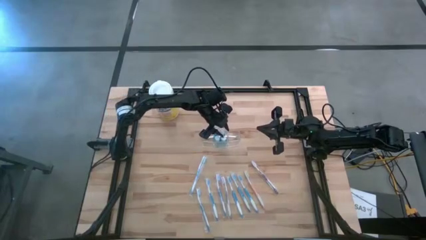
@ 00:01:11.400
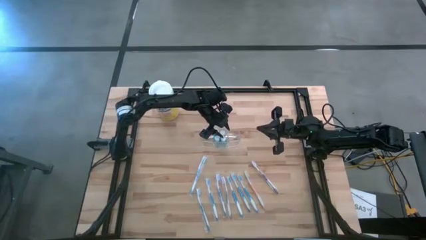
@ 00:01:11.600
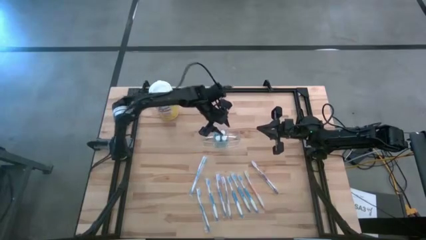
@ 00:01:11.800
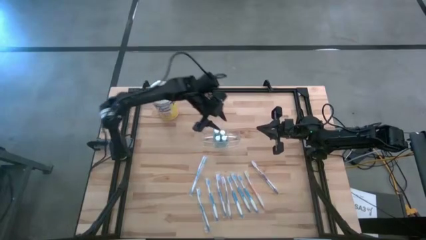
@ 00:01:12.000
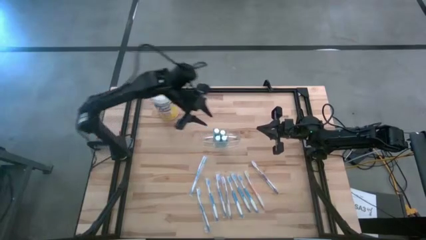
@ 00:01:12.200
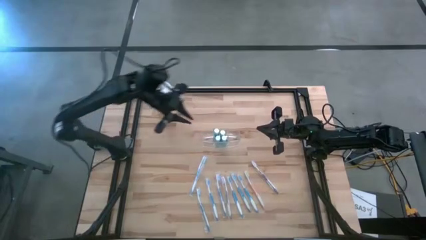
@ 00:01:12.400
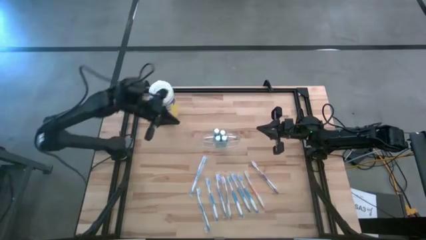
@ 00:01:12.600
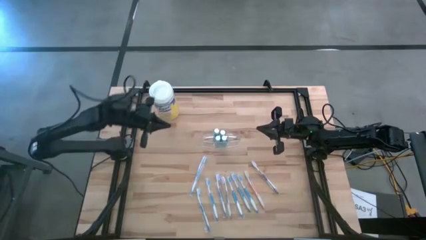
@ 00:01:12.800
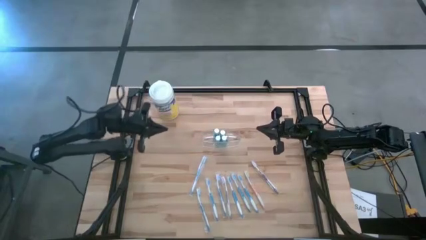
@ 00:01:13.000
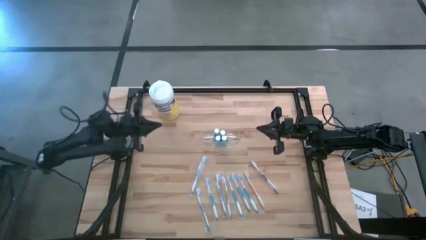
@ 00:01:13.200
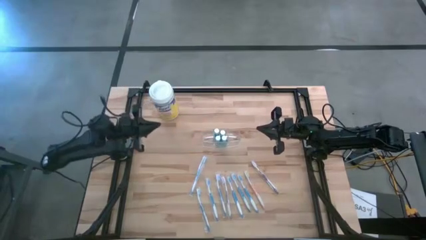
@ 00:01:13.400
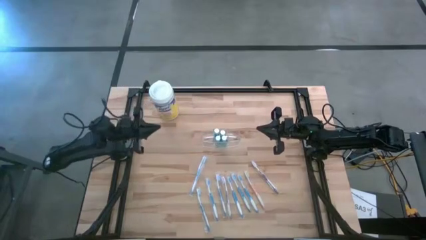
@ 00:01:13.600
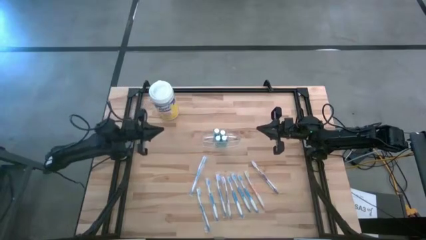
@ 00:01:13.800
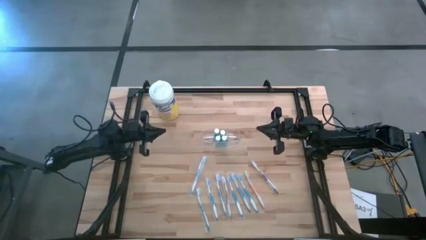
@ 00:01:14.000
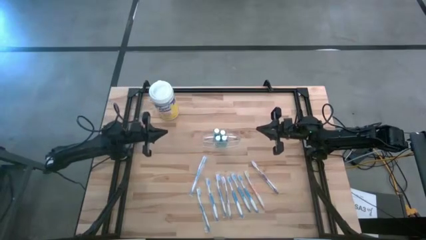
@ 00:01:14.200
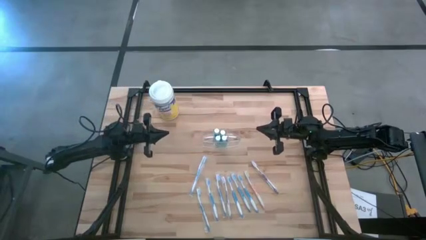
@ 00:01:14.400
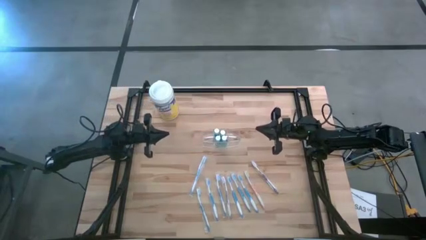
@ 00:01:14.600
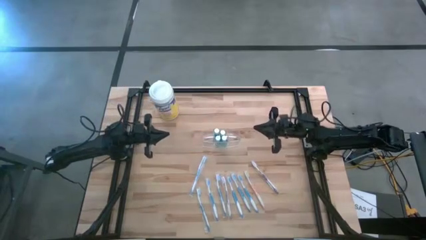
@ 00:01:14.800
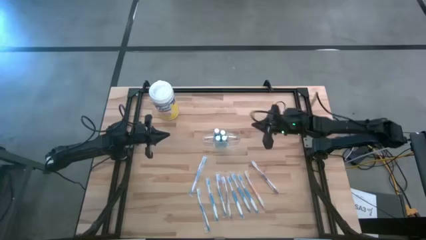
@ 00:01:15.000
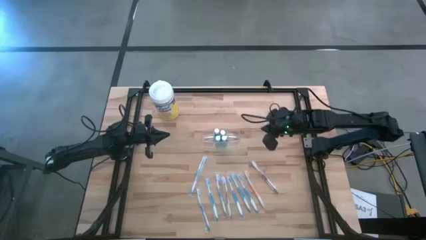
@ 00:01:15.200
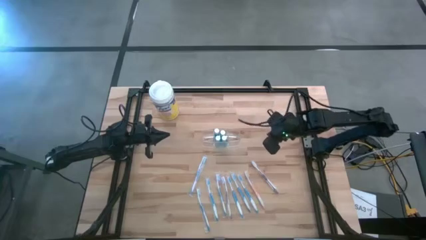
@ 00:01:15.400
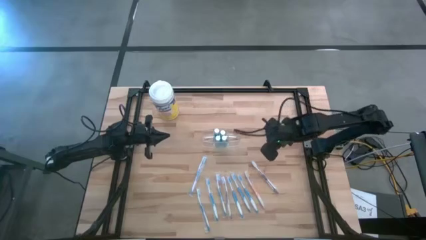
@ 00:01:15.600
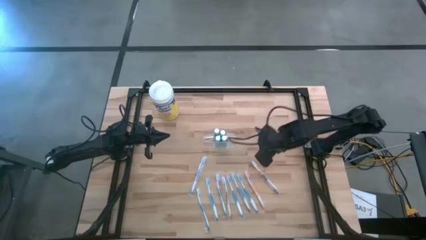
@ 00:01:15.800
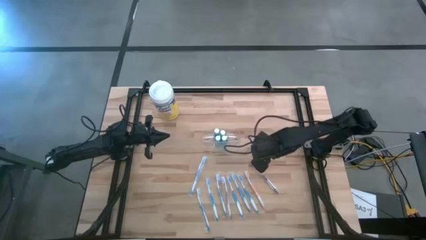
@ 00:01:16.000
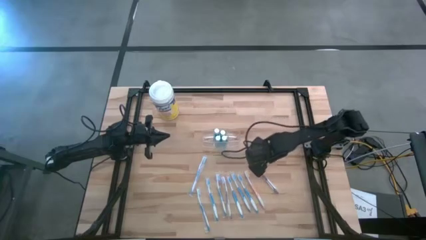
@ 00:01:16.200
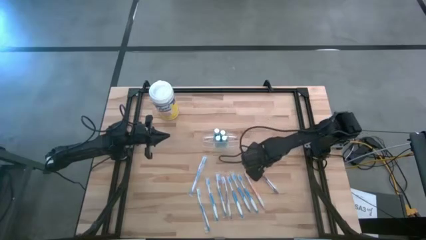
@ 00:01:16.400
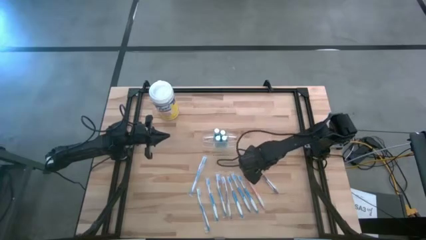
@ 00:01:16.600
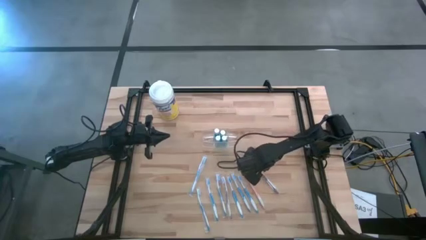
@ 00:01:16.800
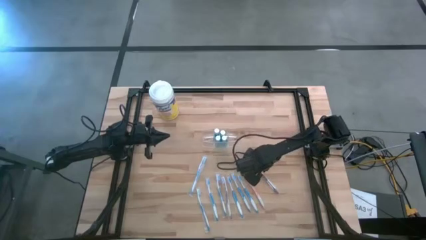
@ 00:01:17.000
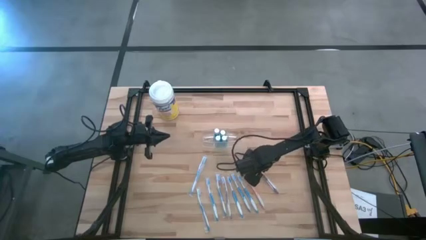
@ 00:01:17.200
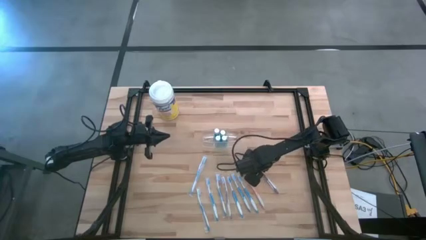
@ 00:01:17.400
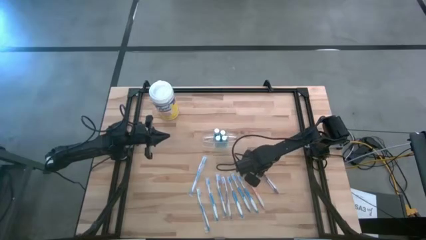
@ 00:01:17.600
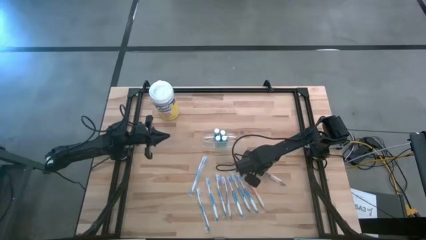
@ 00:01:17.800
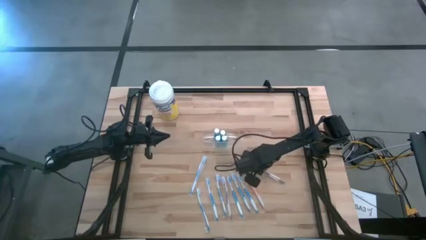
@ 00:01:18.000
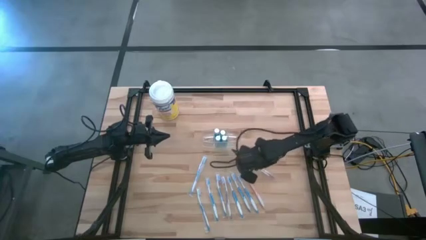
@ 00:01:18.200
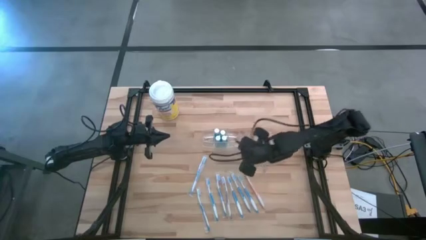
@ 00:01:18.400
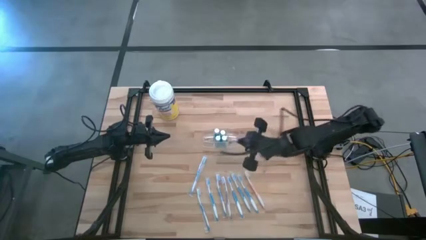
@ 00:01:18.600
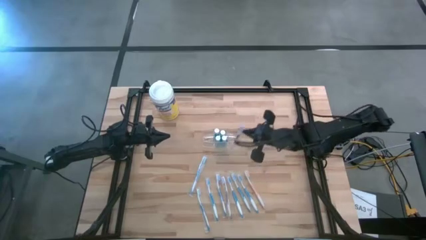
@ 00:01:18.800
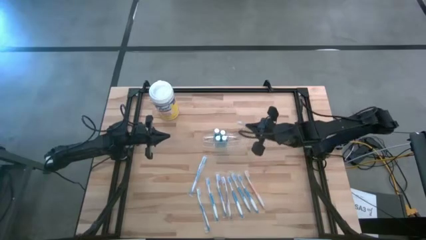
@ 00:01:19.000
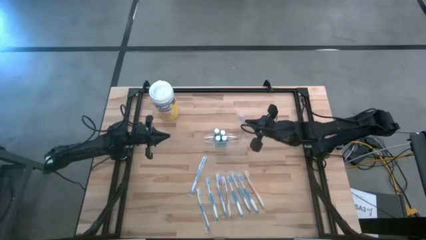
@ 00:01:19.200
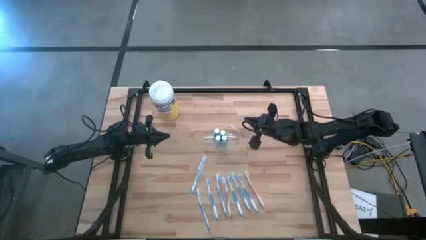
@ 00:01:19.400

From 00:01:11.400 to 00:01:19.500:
Task: Pick & Place toothbrushing station
Put the purple toothbrush into the right section of the transparent organizer

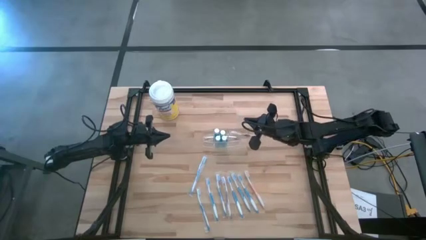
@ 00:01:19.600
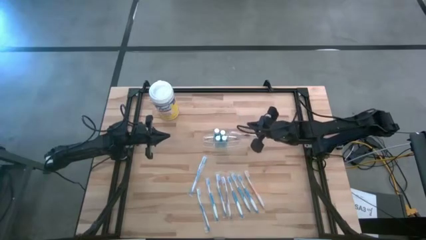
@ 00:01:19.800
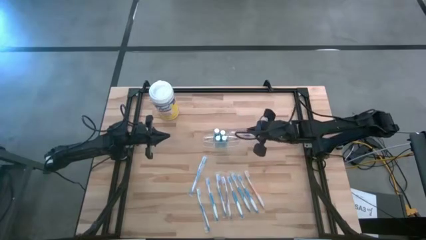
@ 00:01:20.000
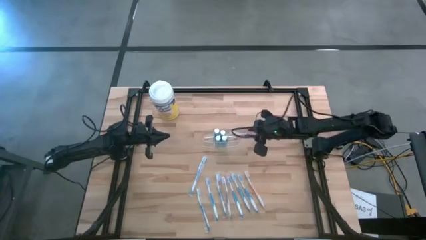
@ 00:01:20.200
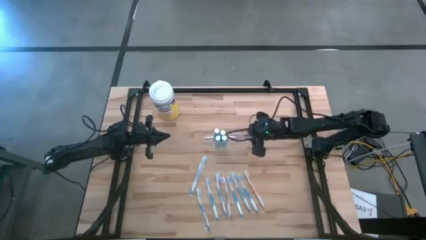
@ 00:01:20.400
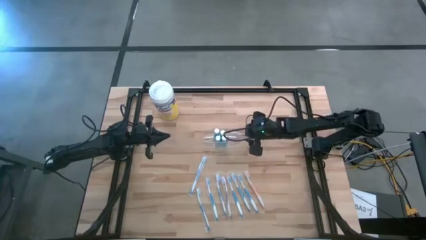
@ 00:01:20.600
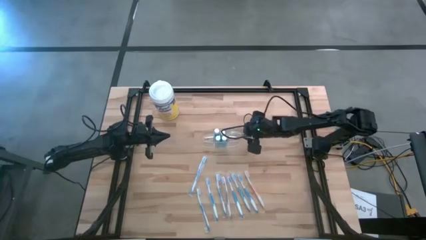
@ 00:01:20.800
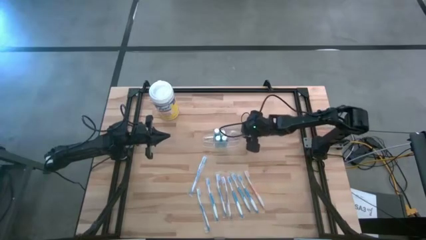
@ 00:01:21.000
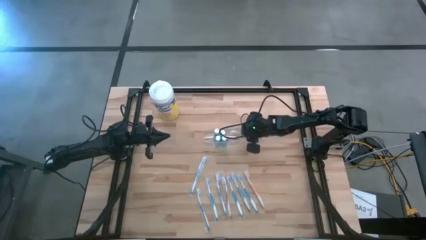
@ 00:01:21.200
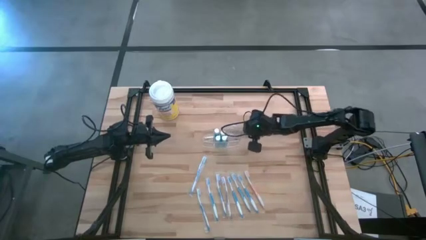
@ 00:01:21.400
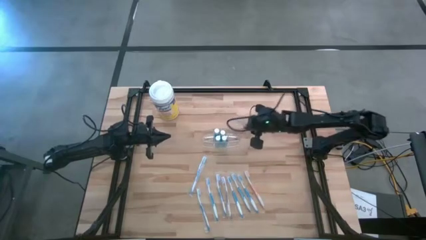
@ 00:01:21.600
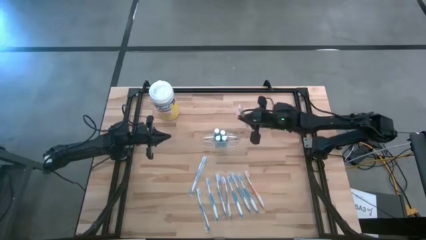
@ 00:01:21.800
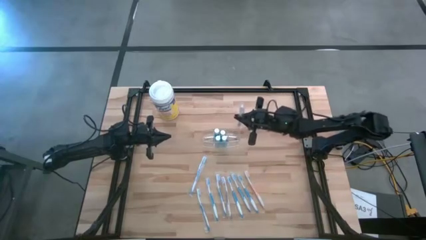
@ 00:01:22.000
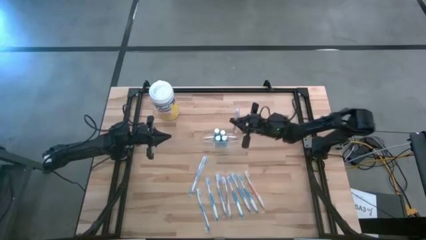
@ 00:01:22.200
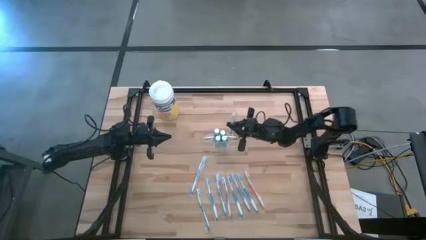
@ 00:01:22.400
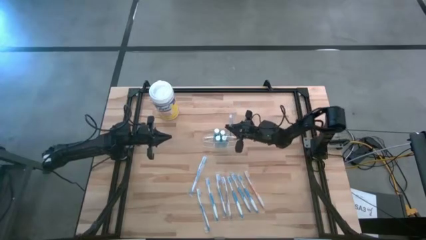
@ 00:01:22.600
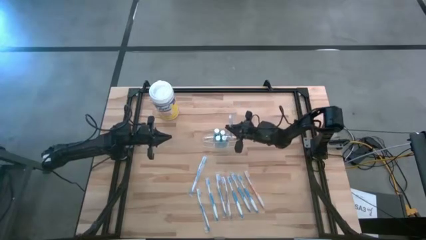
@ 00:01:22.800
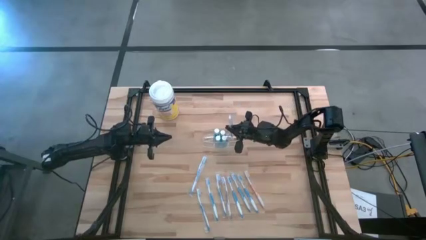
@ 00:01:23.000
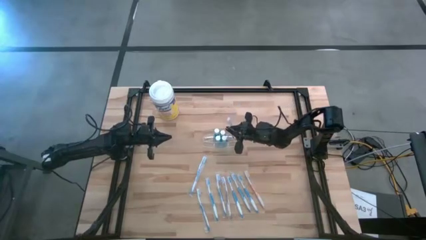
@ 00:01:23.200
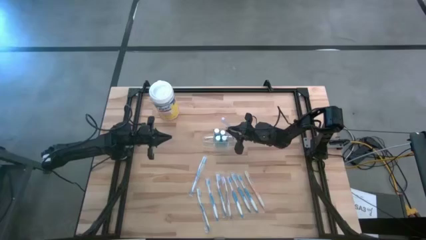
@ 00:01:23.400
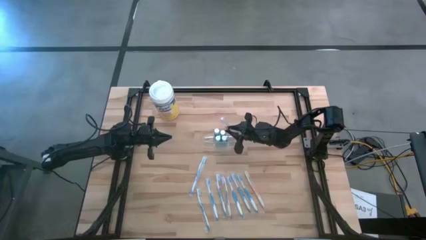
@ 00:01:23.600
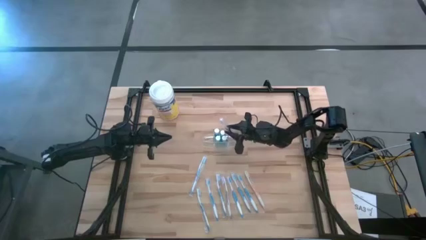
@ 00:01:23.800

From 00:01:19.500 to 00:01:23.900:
Put the purple toothbrush into the right section of the transparent organizer
